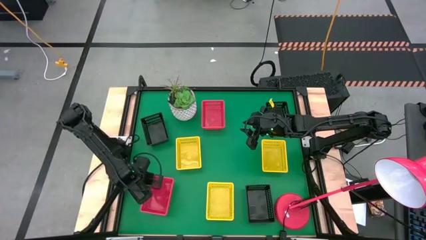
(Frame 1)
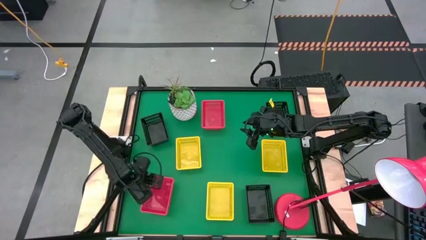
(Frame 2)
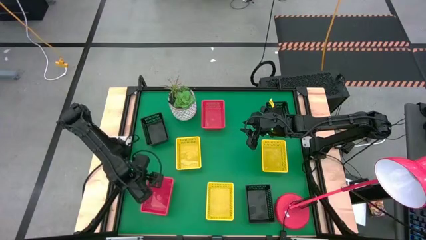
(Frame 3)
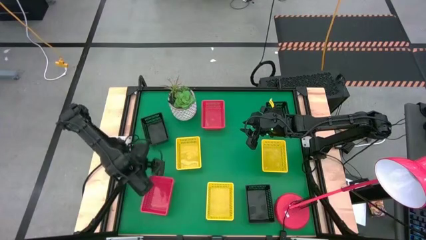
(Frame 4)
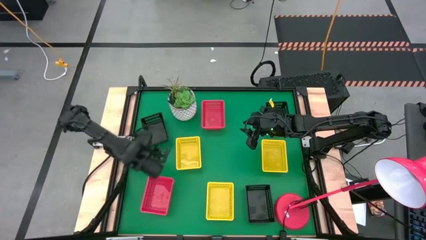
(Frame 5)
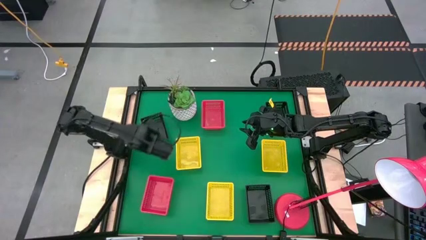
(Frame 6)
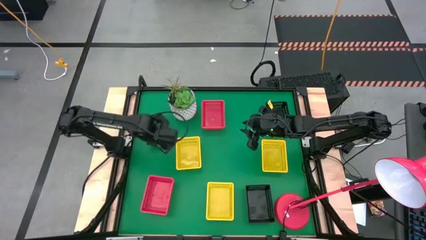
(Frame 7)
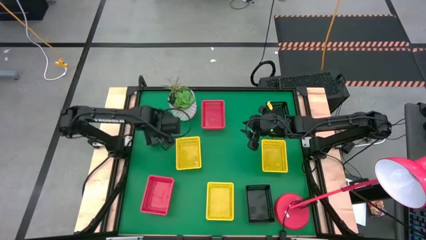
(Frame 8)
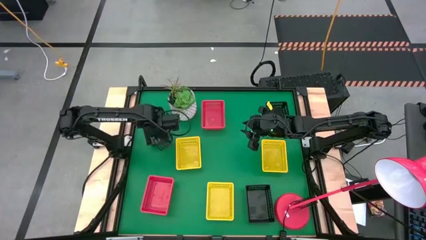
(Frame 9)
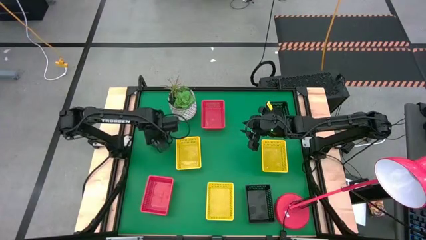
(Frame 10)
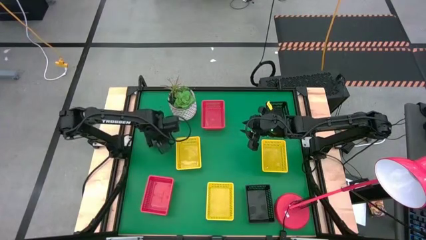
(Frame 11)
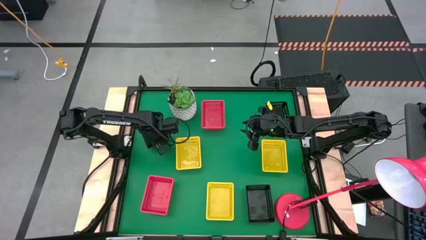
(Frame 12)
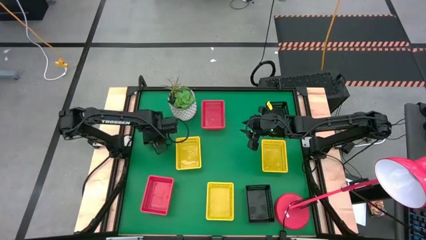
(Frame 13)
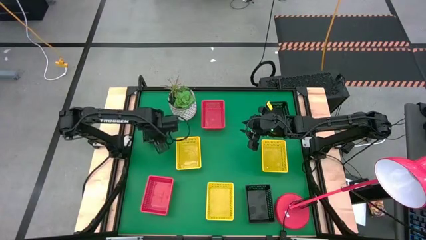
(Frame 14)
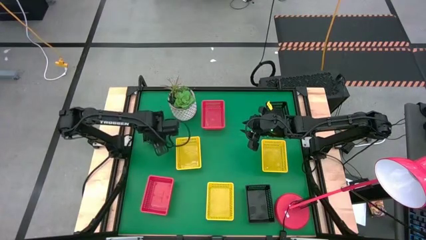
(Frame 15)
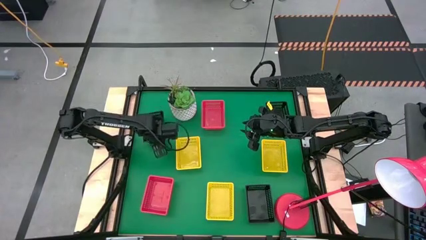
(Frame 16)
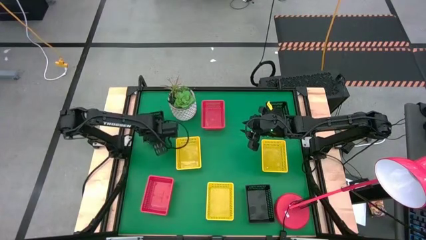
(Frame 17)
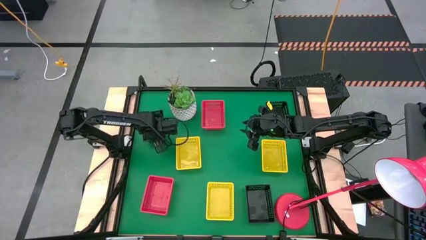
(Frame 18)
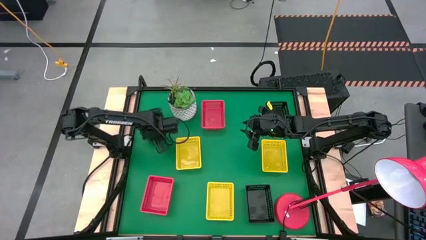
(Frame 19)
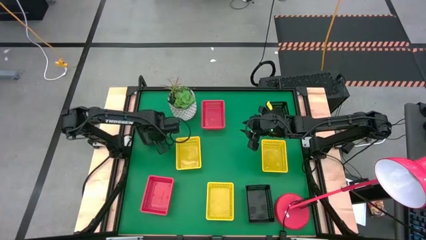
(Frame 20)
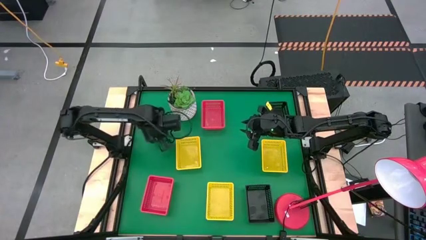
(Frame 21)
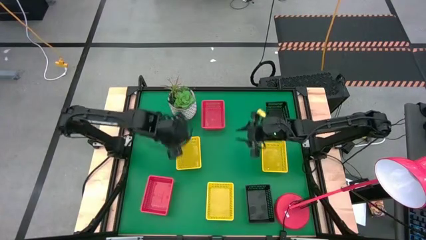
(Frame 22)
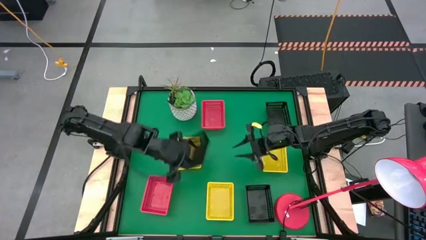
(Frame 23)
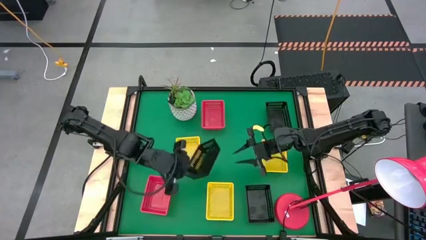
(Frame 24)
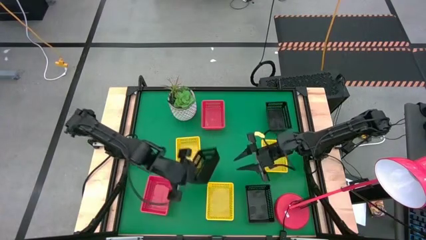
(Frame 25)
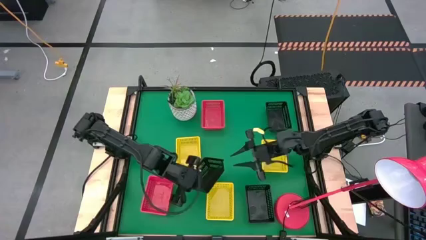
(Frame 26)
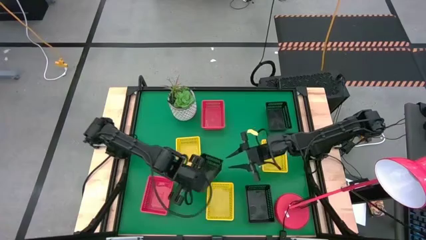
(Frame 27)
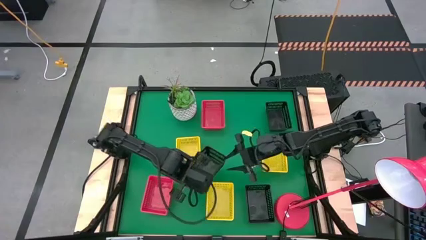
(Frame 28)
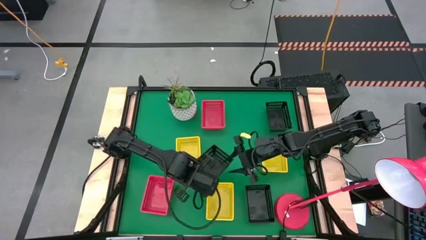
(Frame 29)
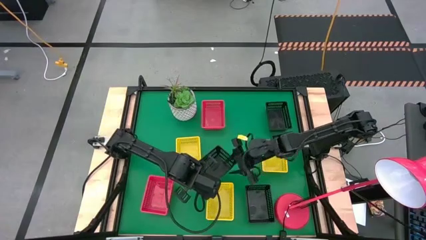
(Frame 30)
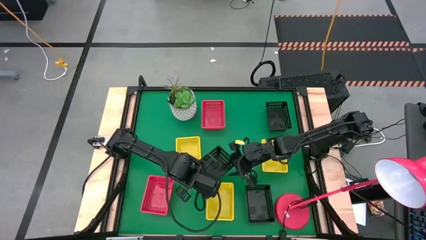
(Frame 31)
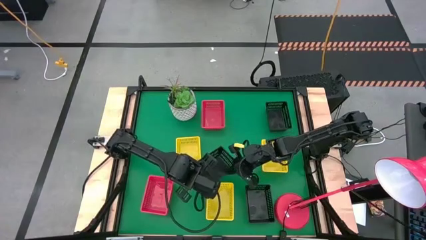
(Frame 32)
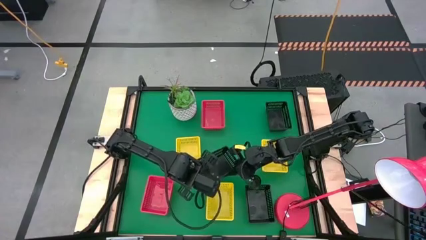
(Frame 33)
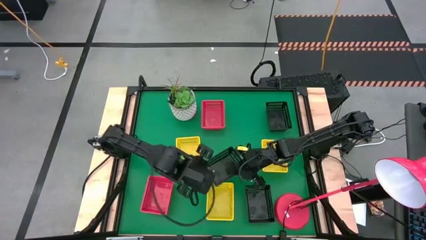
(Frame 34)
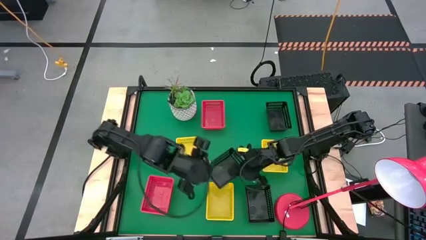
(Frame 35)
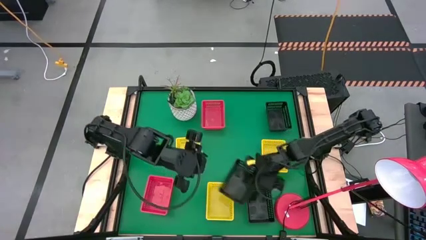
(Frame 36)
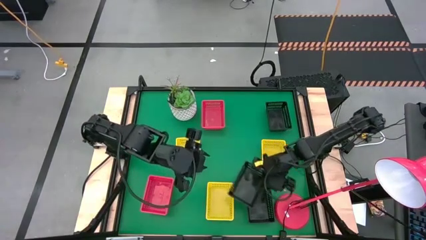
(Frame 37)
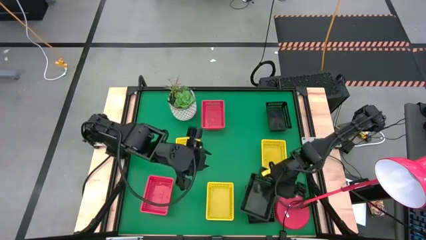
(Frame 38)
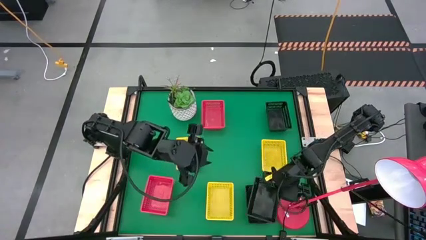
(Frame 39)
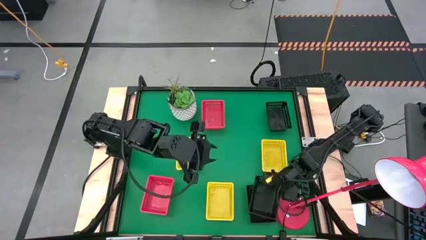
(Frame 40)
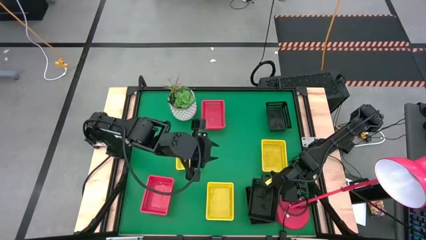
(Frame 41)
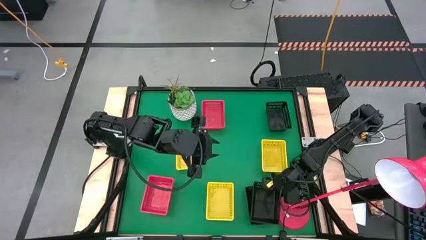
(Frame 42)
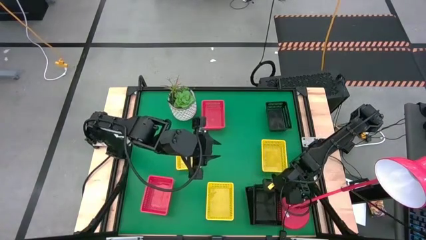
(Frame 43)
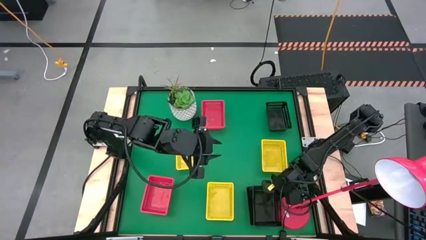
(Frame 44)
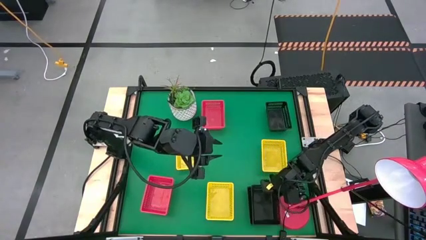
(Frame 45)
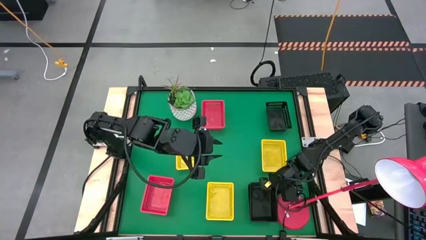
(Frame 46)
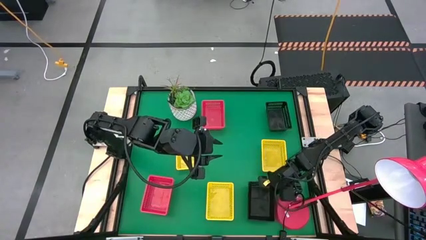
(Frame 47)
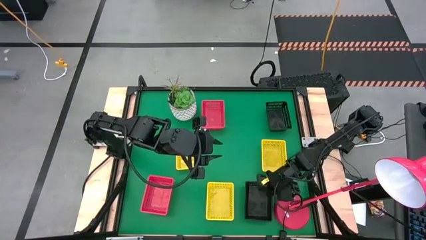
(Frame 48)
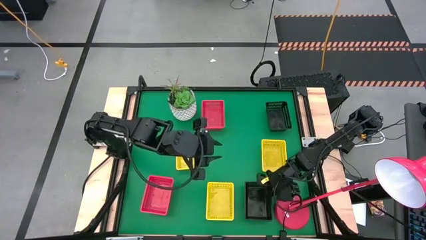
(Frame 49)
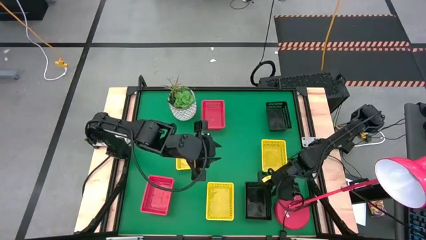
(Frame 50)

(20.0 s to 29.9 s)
Stack the top left black bin on top of the bottom black bin

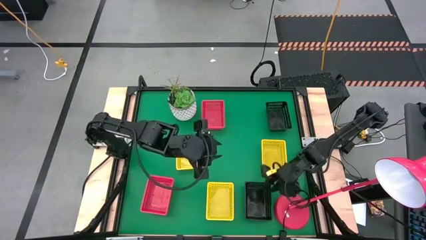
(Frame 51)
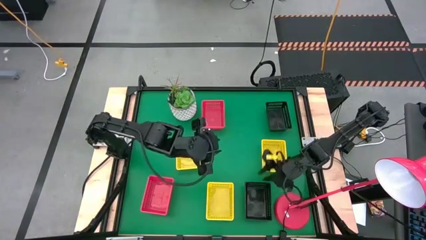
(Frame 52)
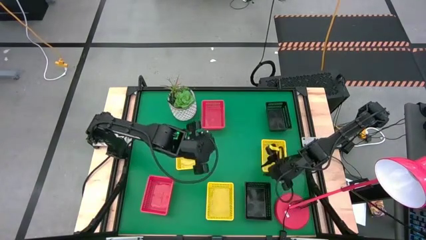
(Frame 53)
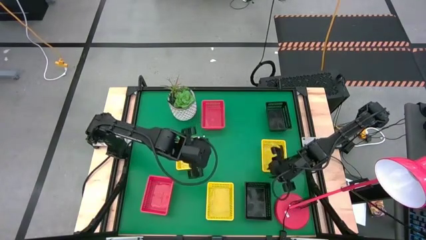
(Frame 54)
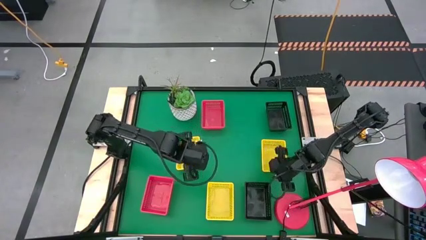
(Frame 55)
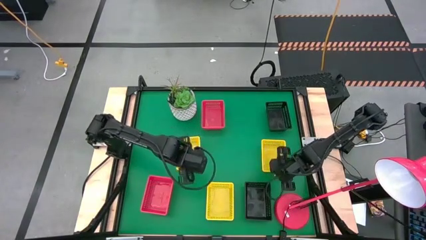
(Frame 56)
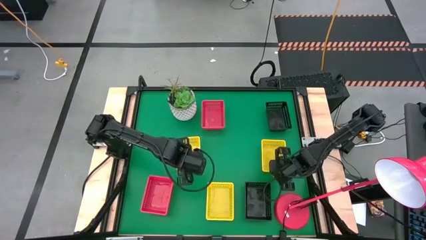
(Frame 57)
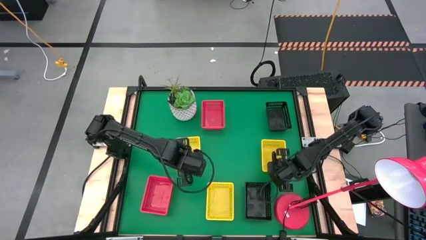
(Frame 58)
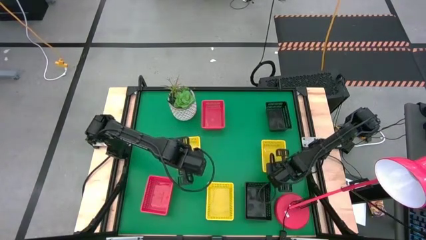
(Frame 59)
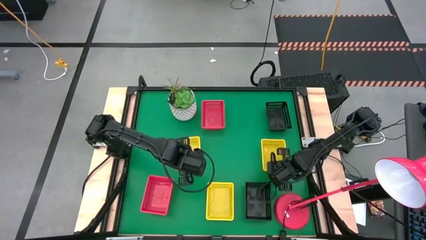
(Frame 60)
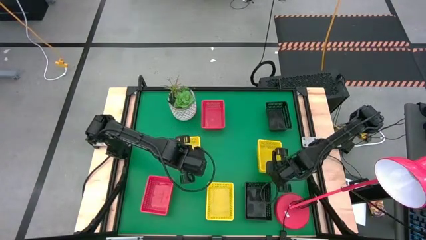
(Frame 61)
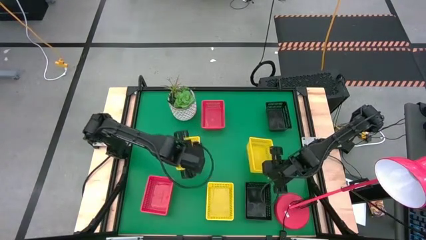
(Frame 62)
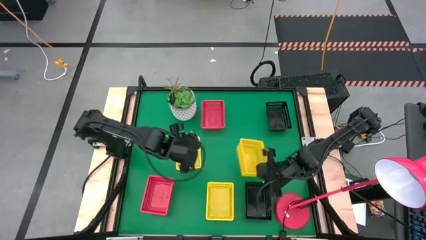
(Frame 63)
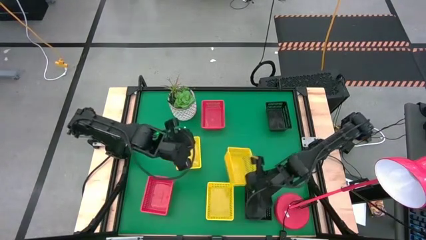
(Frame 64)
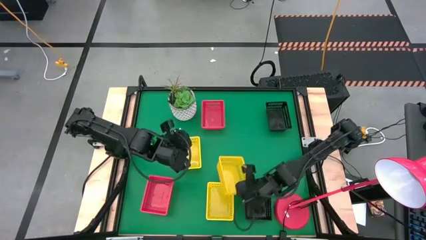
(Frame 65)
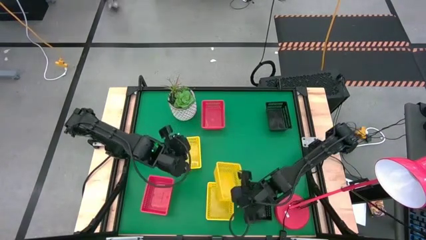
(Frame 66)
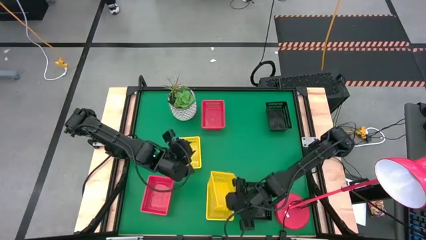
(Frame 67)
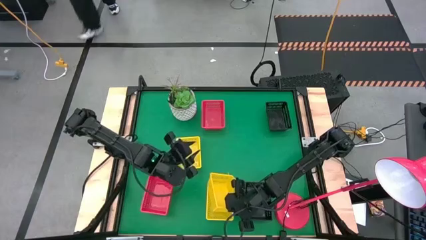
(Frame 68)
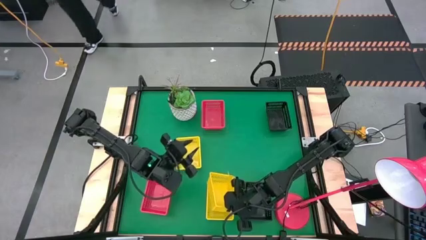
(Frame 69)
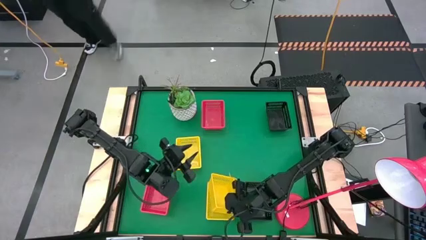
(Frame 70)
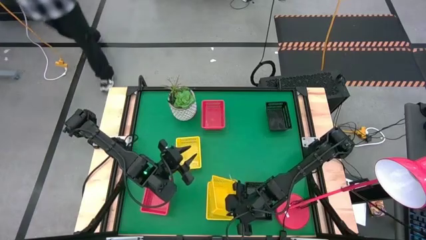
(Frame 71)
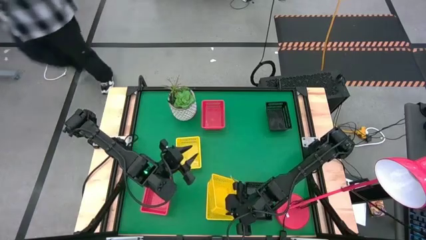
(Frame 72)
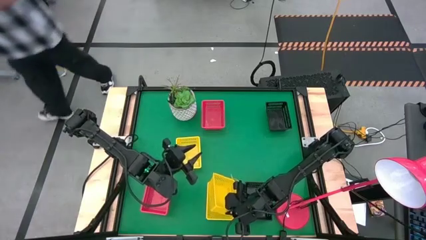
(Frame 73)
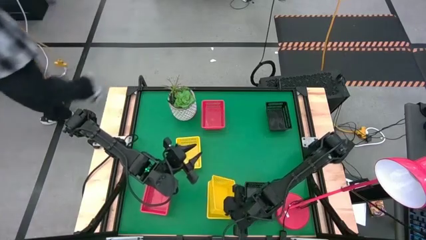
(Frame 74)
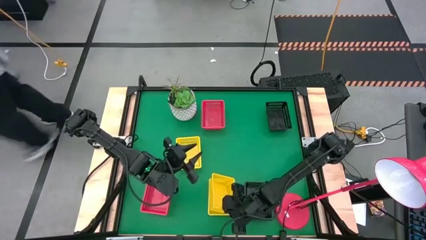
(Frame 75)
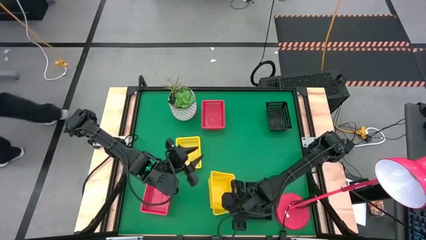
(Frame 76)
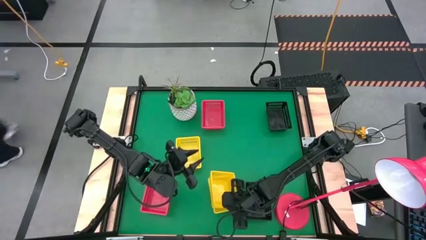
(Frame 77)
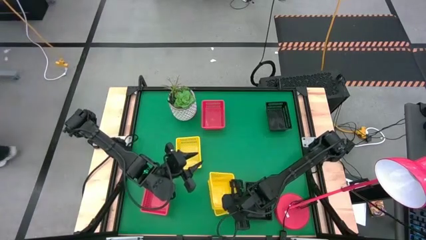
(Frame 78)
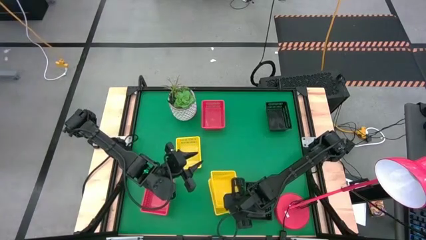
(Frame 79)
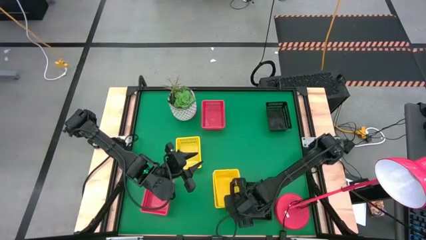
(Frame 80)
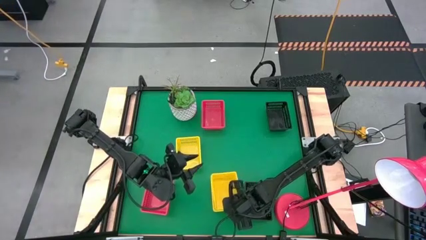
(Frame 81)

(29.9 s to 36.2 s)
Stack the top right yellow bin on top of the bottom yellow bin
